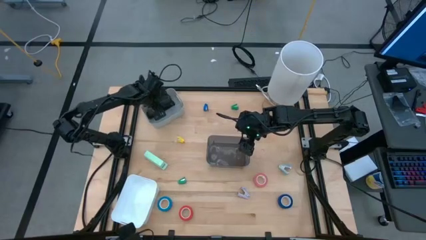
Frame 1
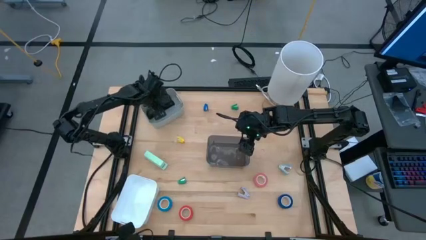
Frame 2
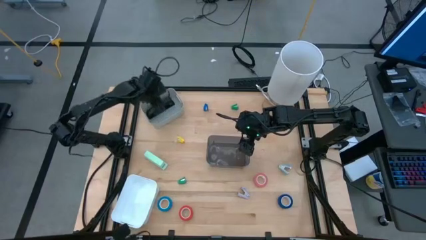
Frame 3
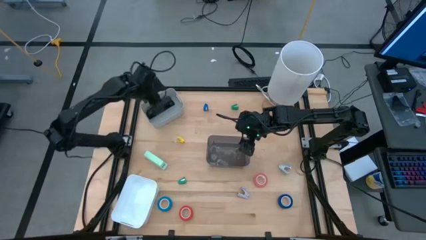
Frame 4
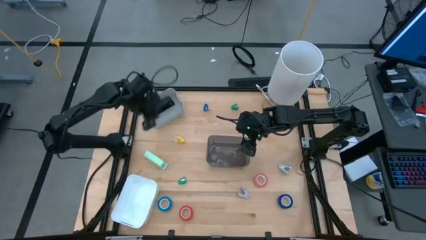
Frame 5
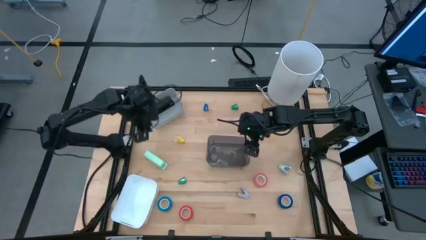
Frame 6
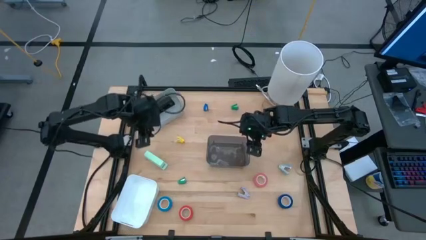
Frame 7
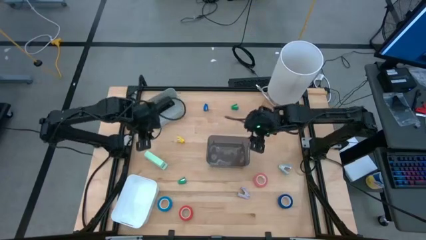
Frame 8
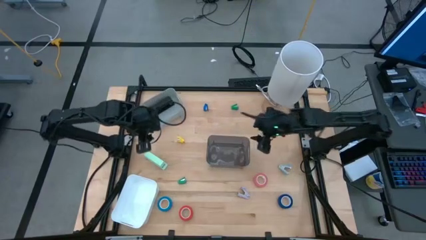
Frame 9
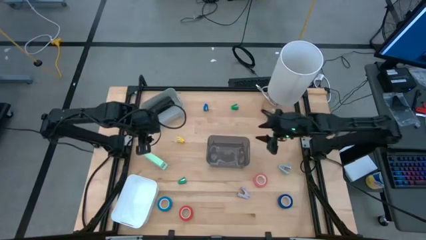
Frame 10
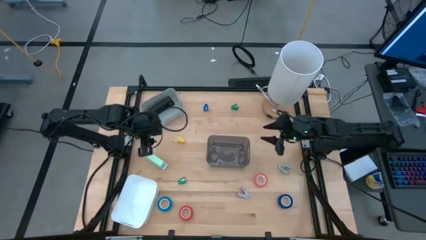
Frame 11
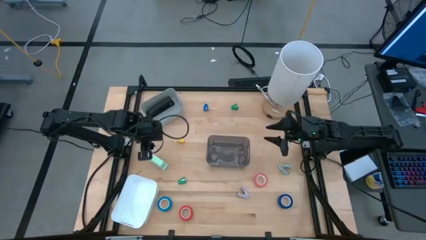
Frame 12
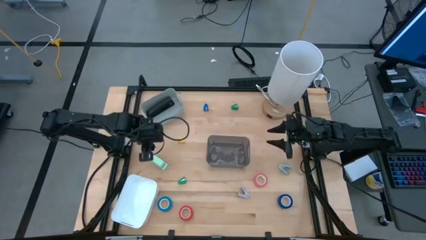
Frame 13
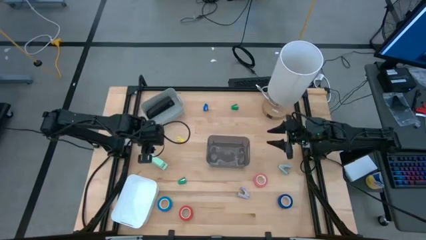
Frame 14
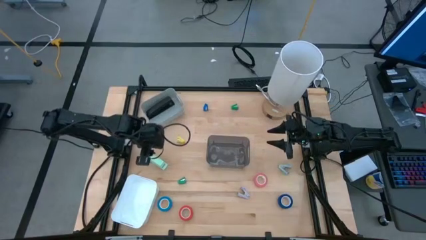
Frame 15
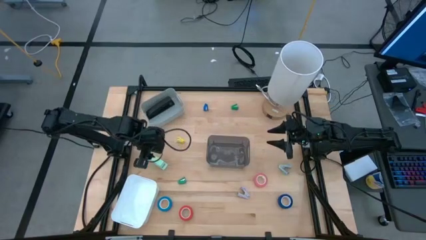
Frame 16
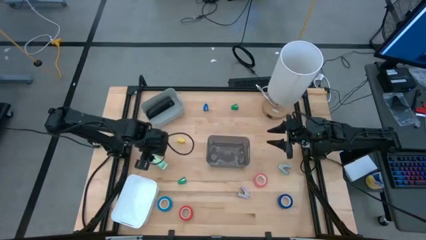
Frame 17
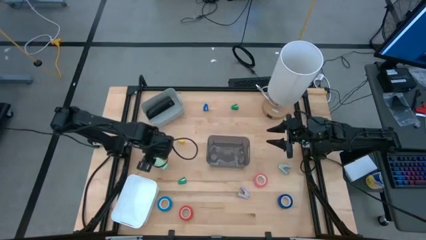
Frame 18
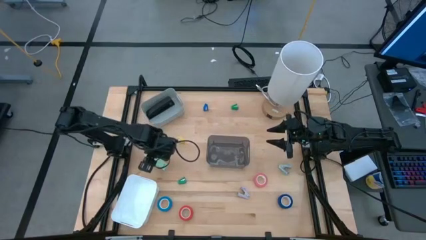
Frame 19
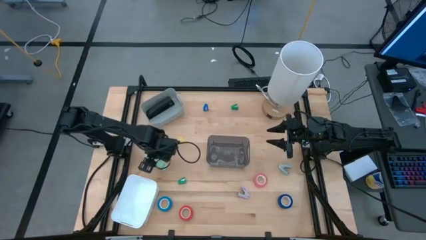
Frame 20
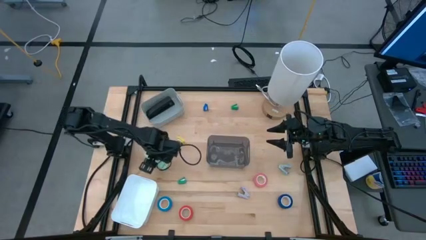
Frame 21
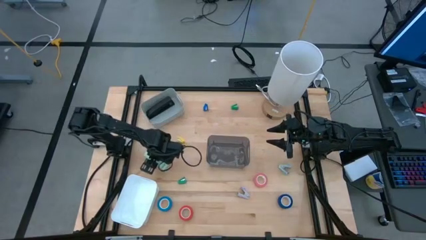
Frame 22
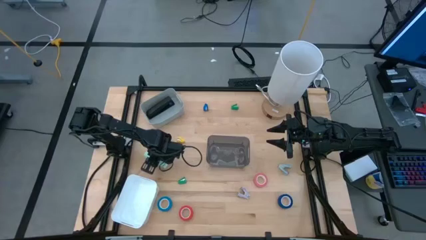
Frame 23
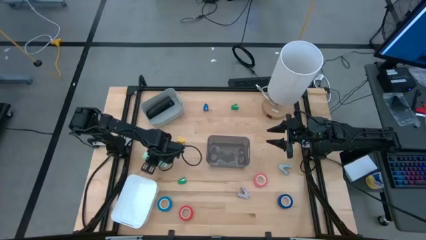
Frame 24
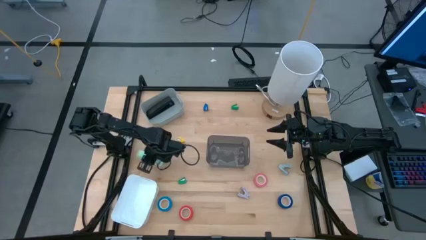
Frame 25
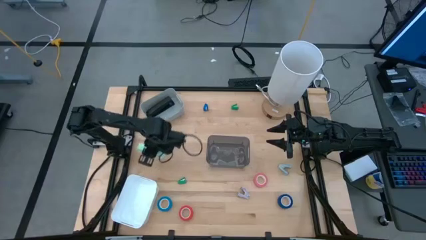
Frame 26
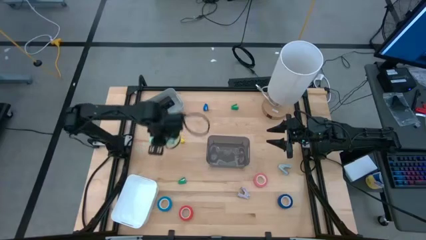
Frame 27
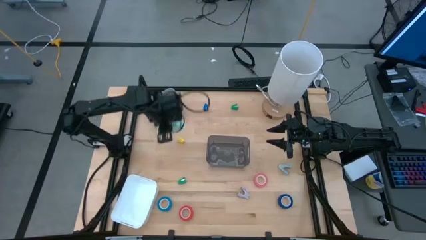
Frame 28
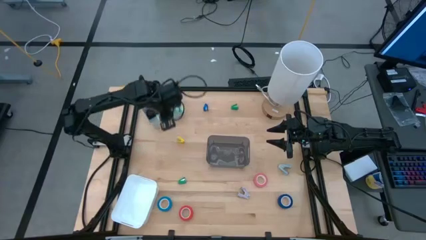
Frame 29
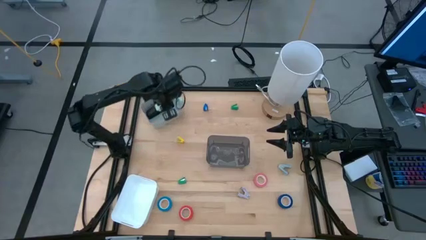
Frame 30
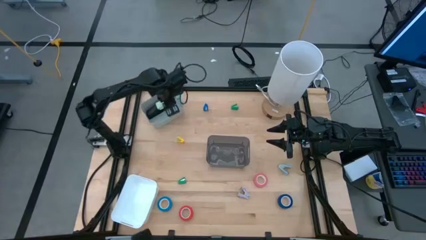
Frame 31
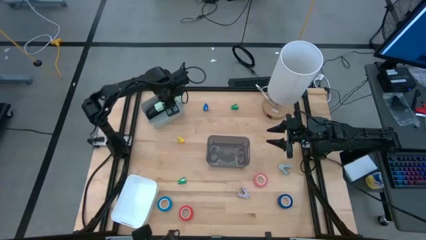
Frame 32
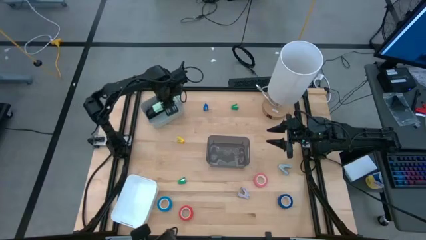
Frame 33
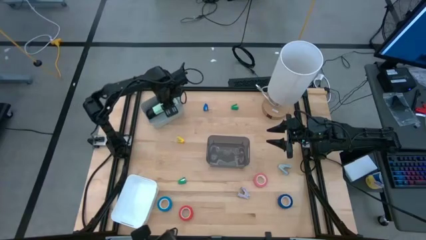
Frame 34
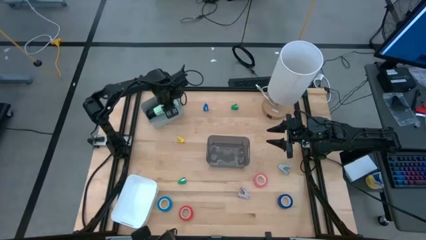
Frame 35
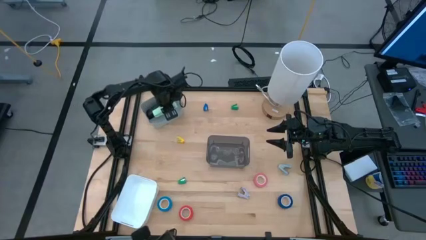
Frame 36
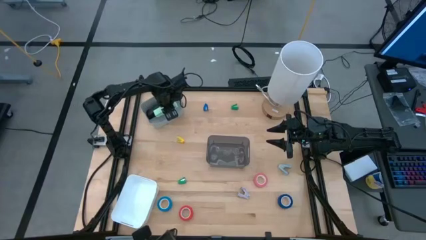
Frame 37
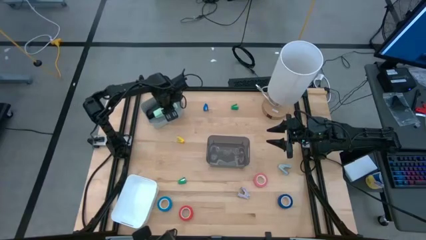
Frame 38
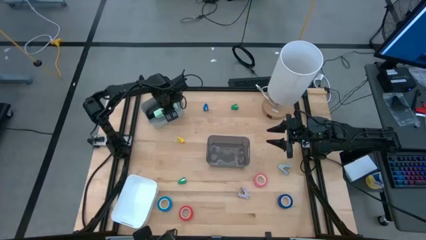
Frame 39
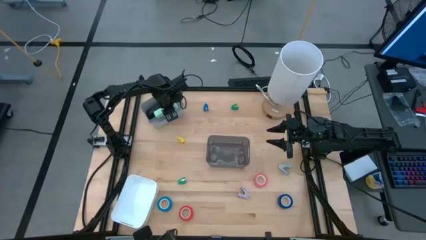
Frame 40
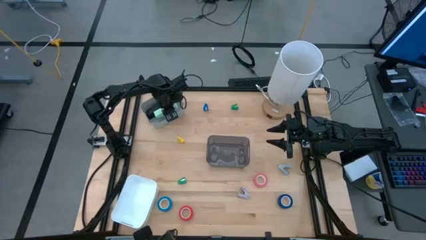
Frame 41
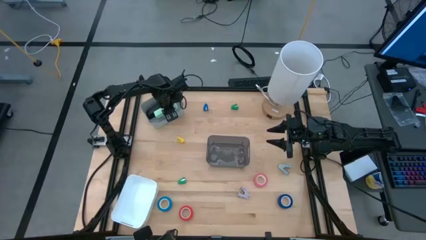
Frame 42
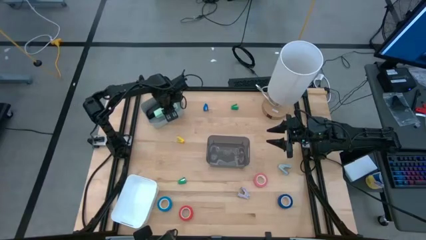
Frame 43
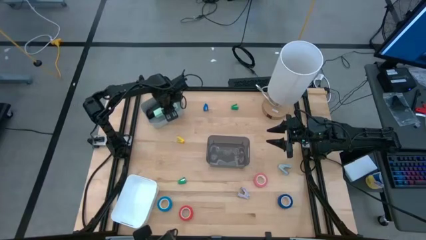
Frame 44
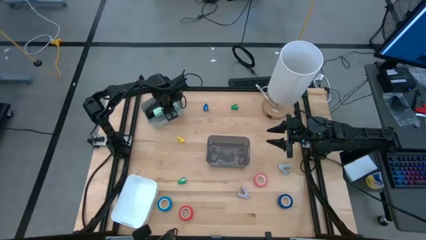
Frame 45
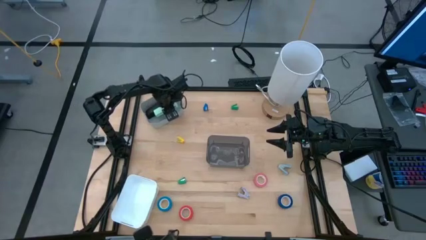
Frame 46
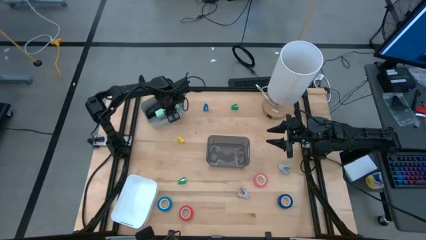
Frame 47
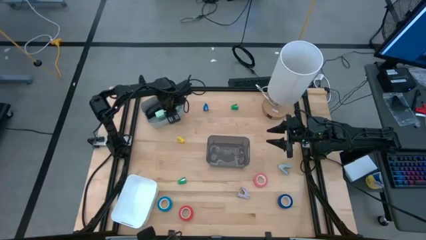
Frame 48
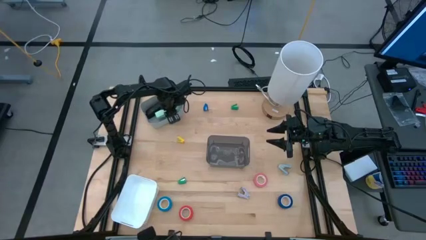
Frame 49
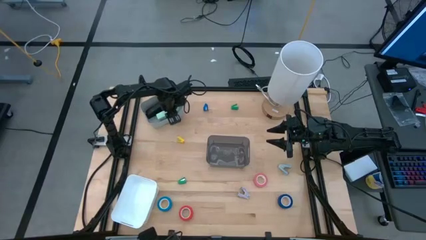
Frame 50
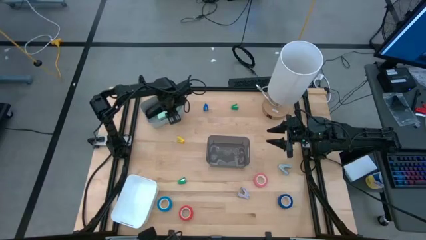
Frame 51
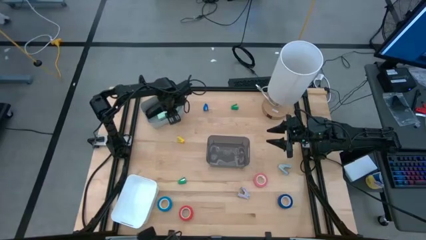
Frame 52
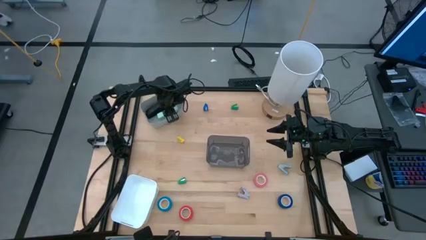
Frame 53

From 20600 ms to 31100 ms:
Task: Pick and place Stapler, Stapler remover, tape
Put the light green stapler into the gray bin

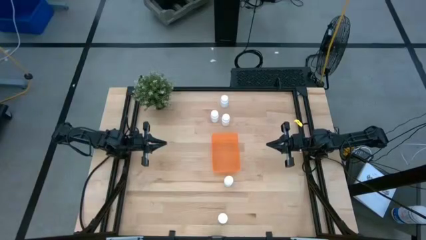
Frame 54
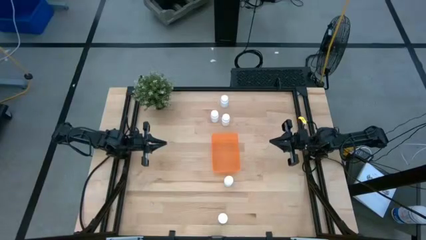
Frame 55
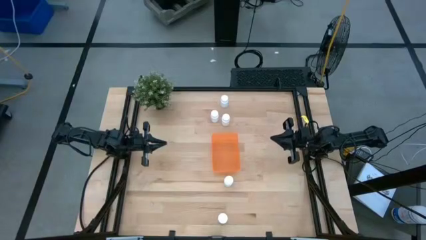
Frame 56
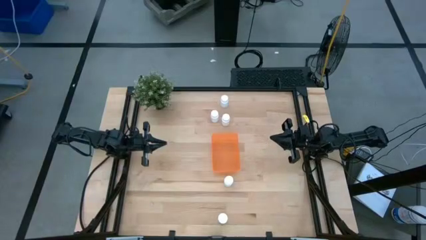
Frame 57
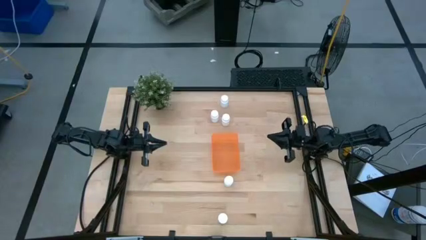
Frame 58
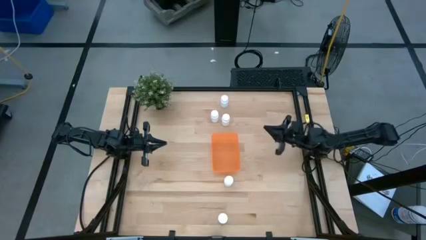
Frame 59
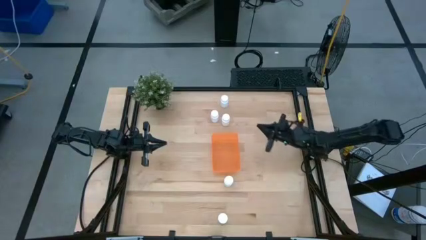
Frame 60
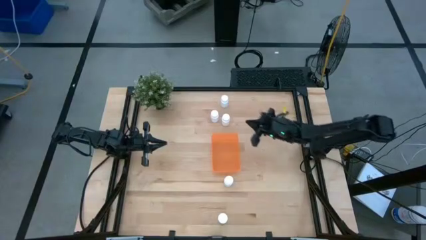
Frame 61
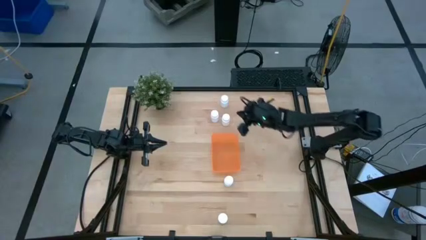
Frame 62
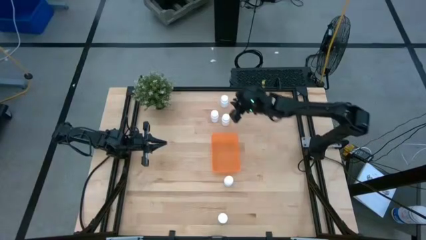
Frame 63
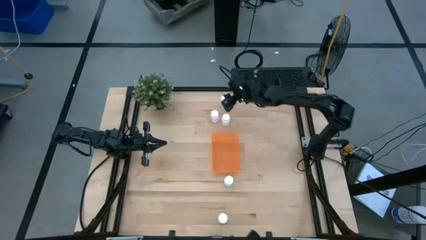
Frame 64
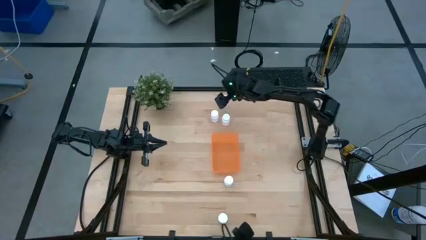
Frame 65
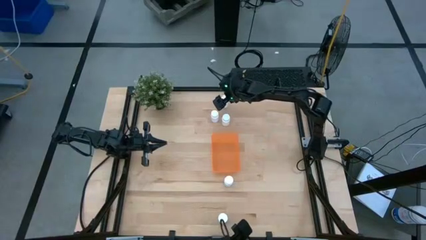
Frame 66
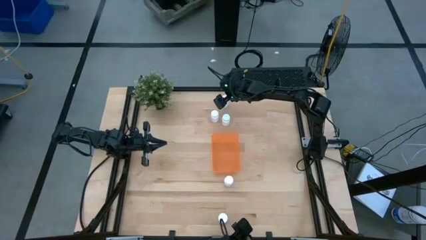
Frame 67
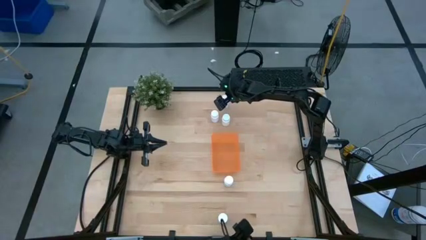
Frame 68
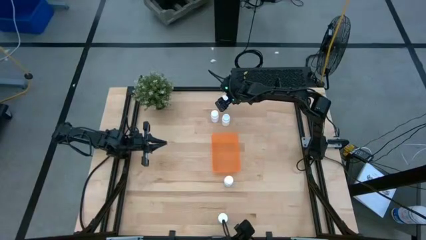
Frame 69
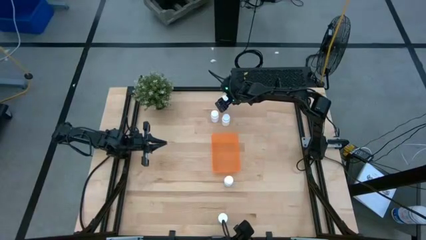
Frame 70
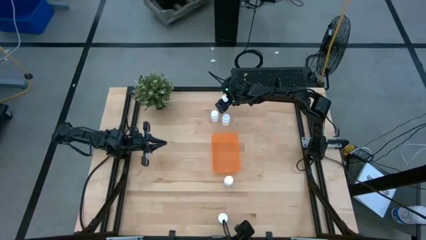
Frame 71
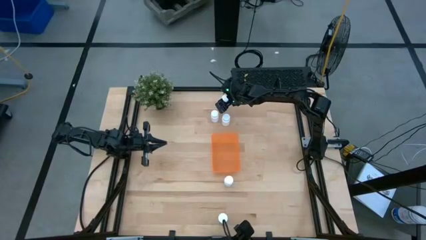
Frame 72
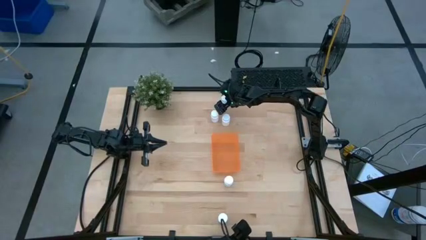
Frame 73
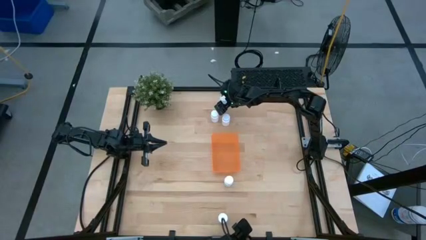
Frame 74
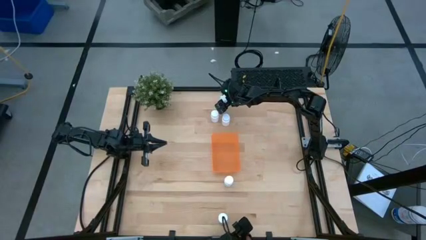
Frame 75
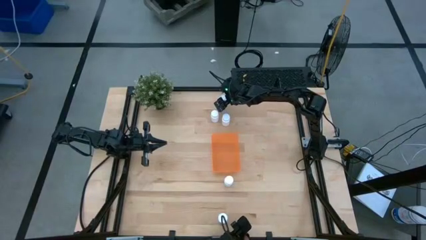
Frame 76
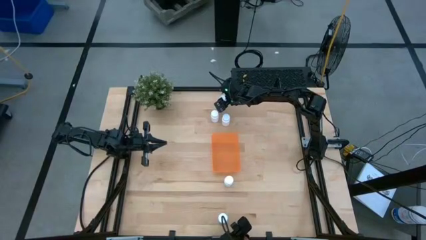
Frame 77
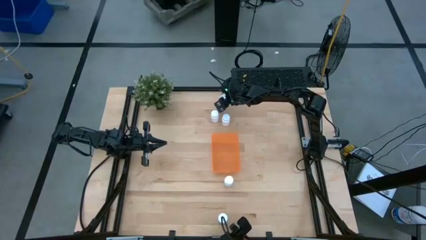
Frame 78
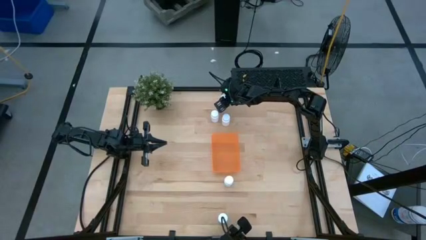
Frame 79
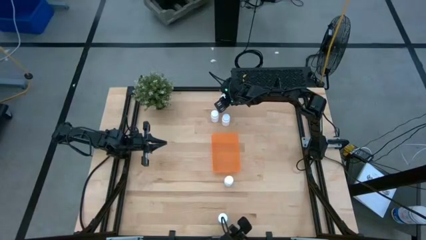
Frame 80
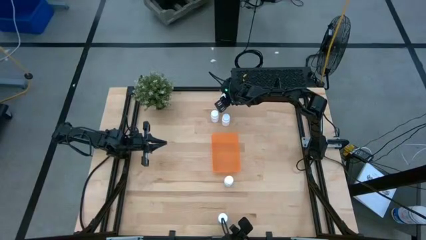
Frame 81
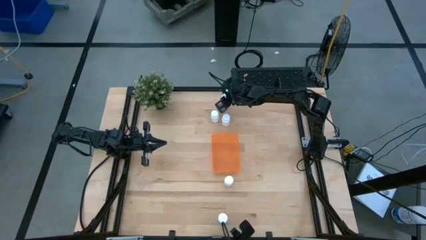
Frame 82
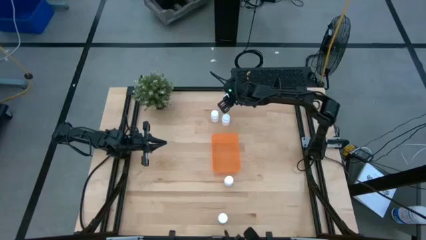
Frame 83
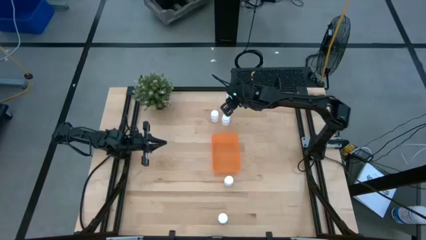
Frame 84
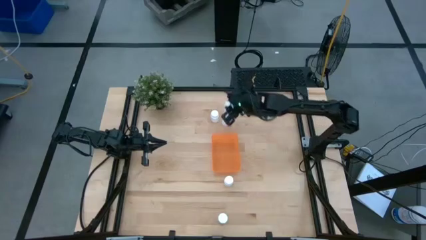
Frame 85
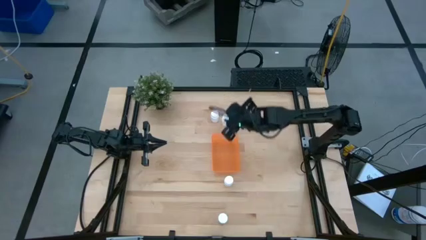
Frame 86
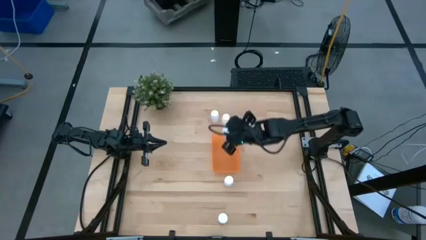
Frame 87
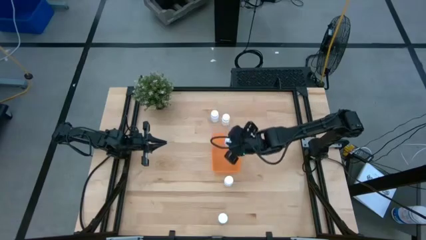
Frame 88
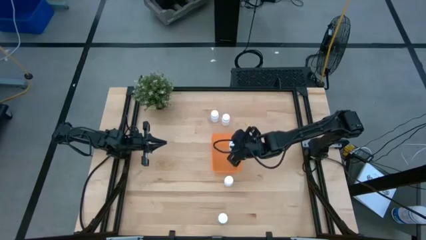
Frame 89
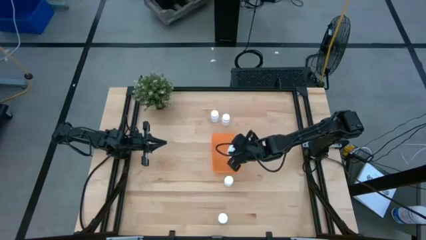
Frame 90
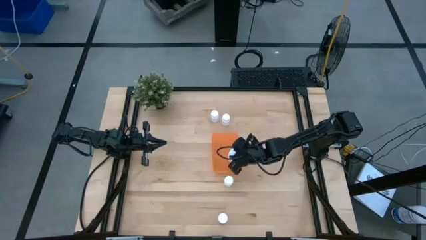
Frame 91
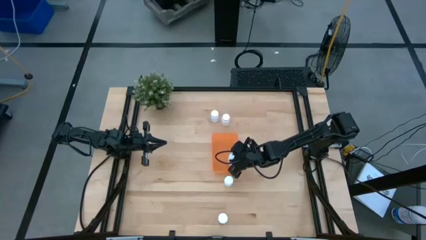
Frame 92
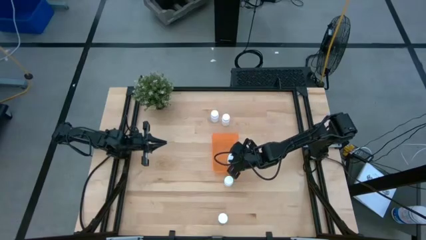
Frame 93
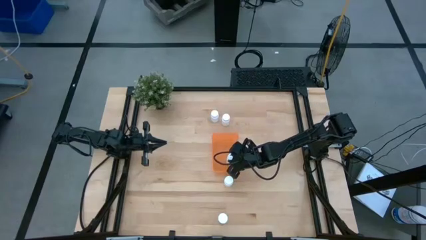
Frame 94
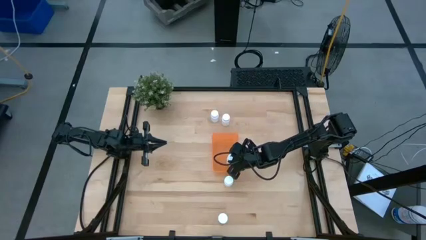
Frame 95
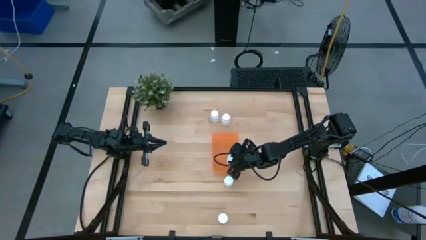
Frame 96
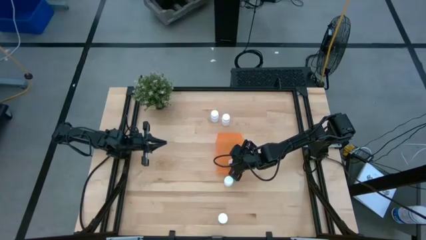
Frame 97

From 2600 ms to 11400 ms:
Task: Pick and place pill bottles into a basket
Put the white medicine bottle into the orange bin
